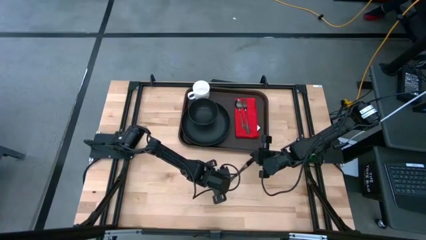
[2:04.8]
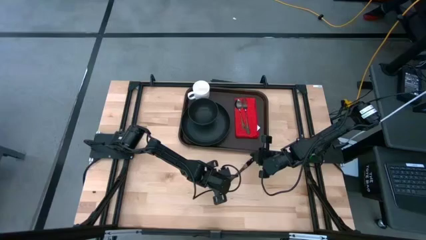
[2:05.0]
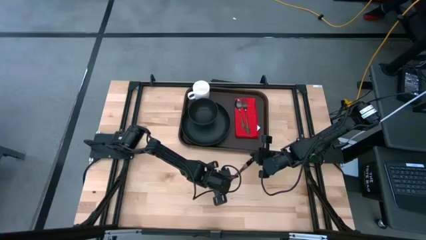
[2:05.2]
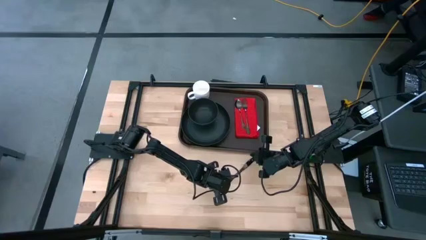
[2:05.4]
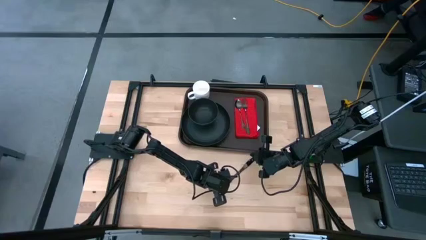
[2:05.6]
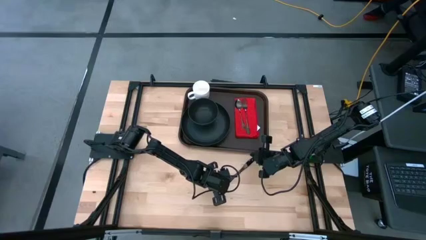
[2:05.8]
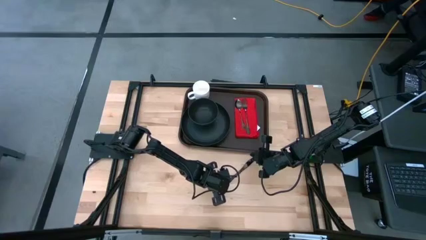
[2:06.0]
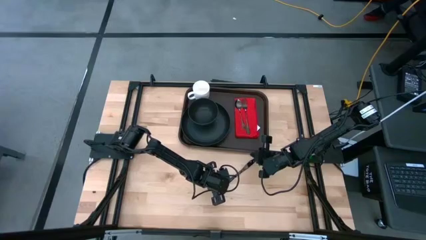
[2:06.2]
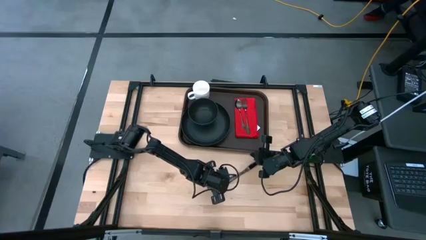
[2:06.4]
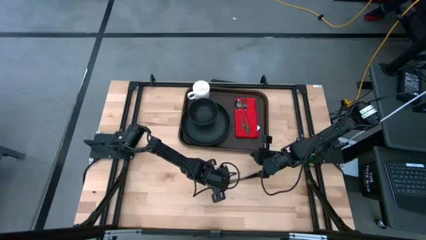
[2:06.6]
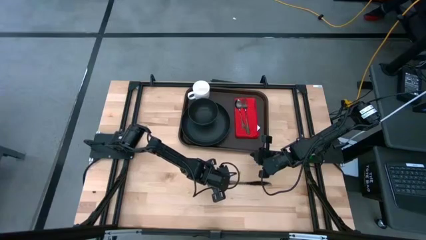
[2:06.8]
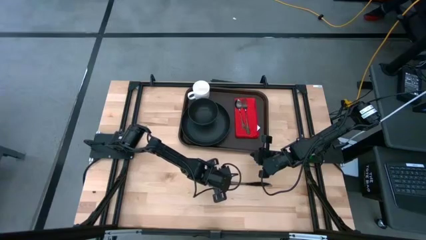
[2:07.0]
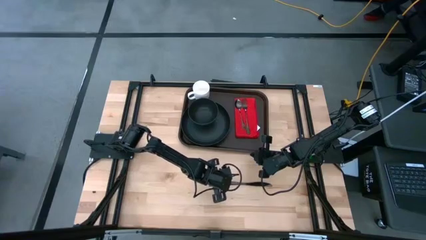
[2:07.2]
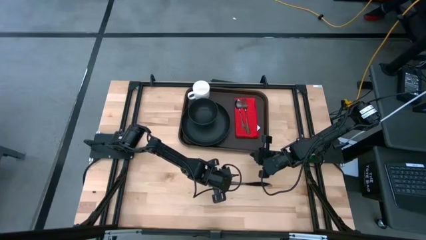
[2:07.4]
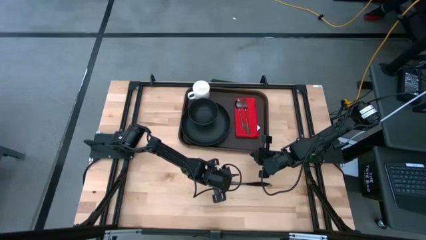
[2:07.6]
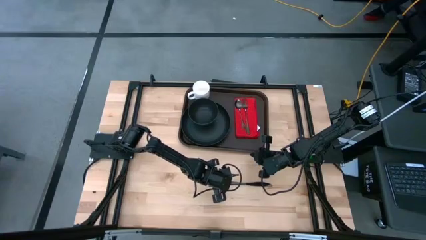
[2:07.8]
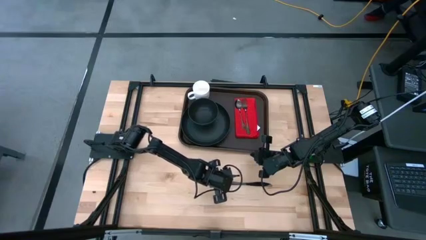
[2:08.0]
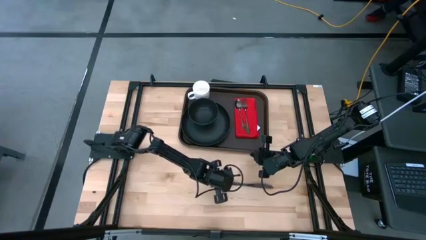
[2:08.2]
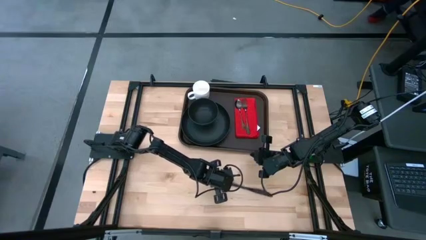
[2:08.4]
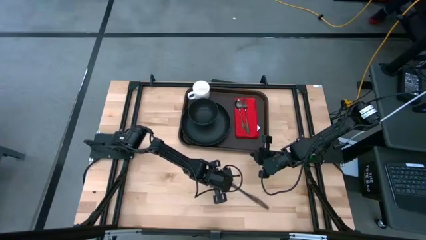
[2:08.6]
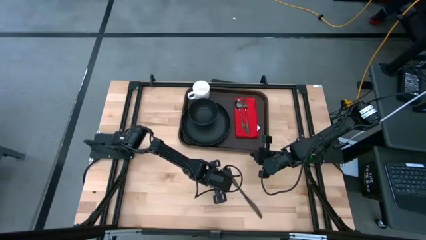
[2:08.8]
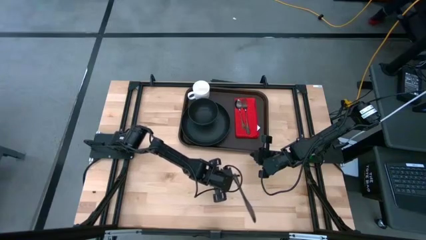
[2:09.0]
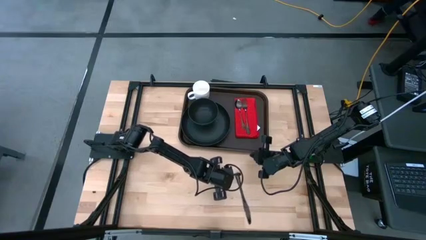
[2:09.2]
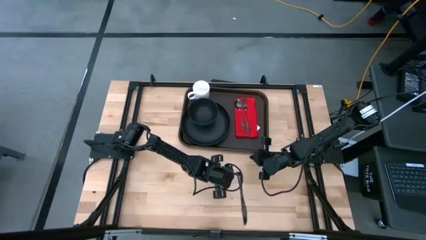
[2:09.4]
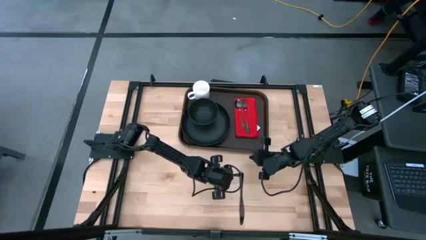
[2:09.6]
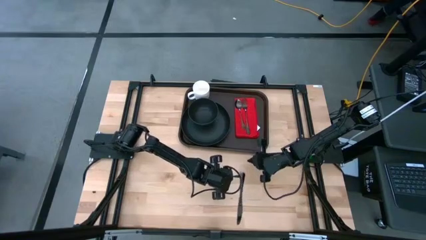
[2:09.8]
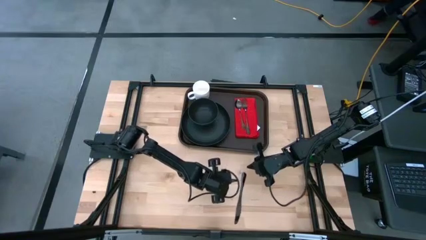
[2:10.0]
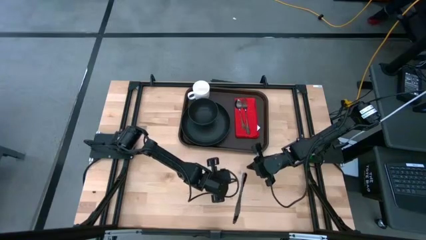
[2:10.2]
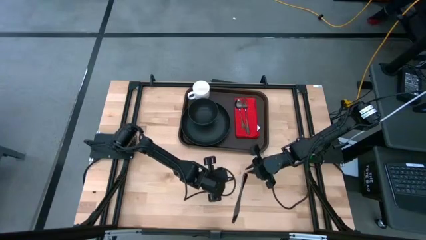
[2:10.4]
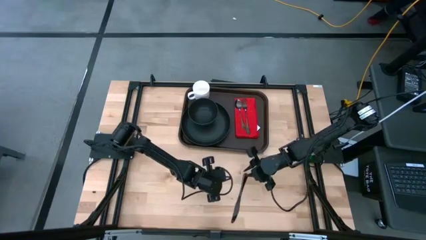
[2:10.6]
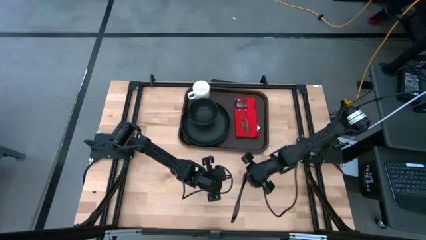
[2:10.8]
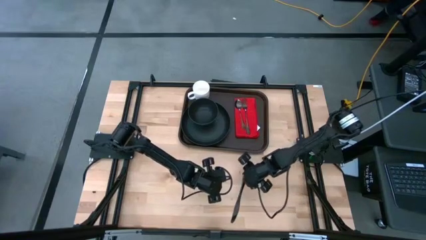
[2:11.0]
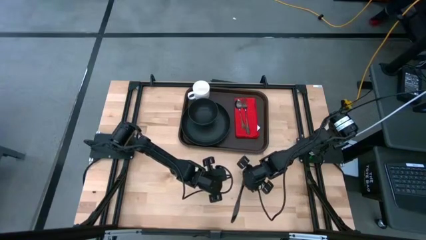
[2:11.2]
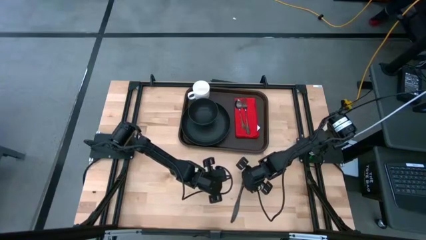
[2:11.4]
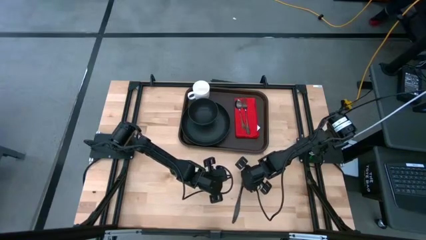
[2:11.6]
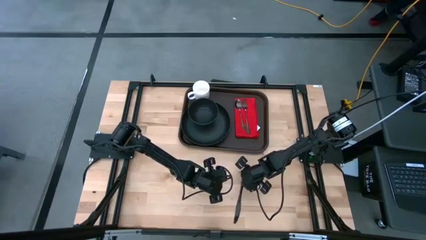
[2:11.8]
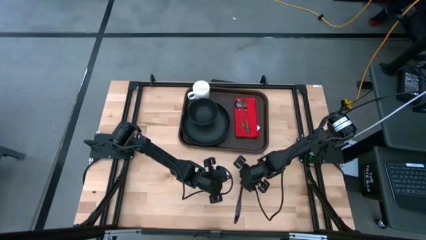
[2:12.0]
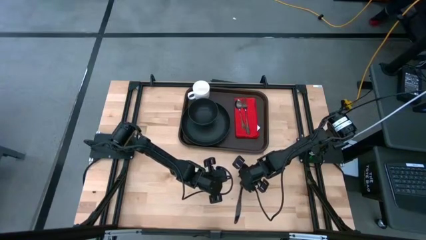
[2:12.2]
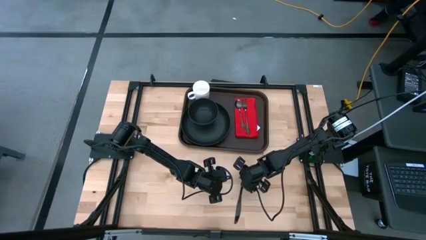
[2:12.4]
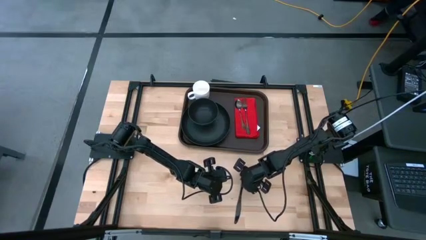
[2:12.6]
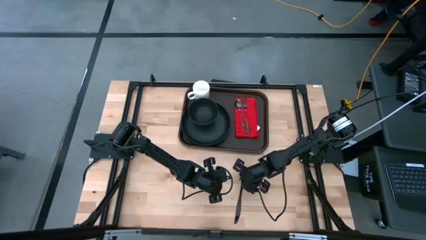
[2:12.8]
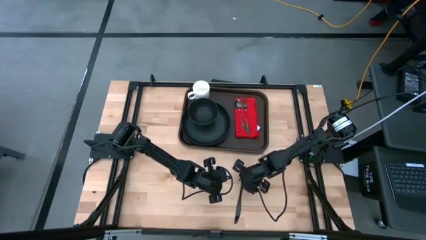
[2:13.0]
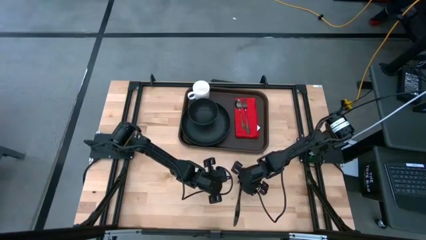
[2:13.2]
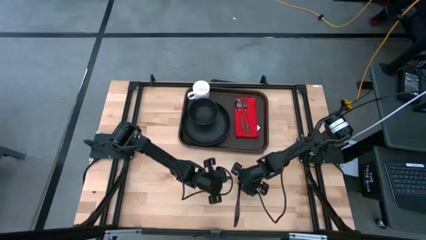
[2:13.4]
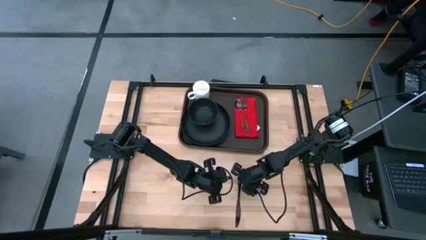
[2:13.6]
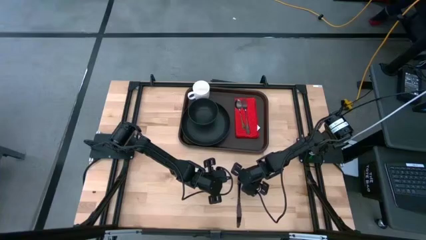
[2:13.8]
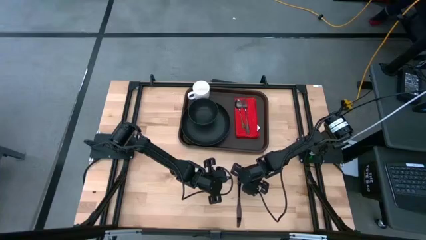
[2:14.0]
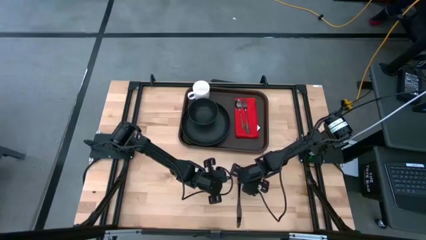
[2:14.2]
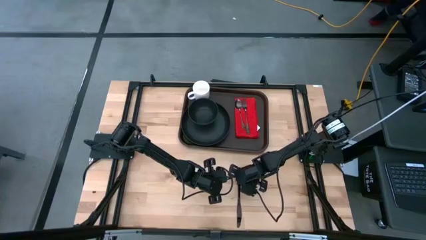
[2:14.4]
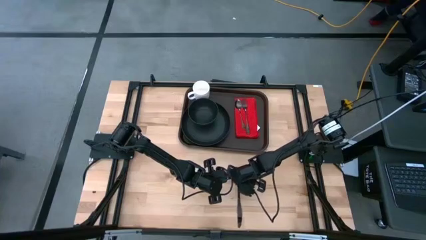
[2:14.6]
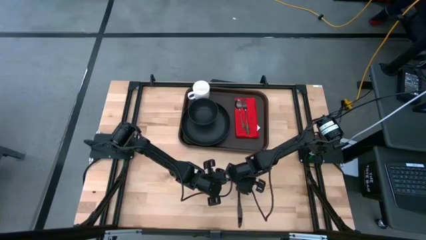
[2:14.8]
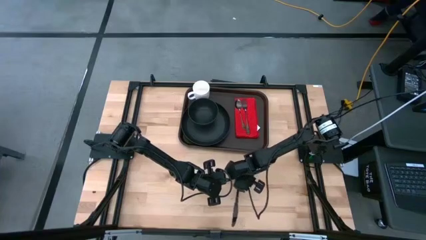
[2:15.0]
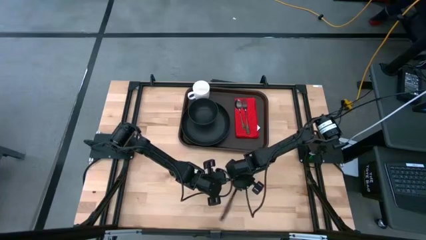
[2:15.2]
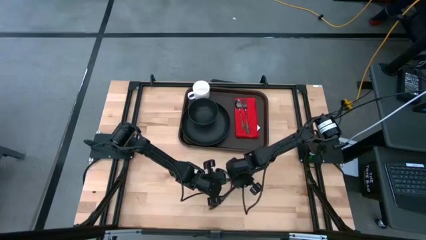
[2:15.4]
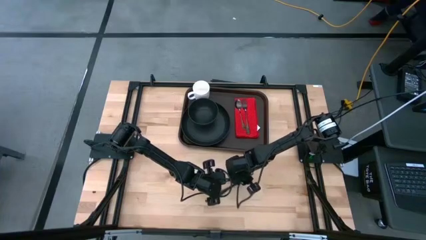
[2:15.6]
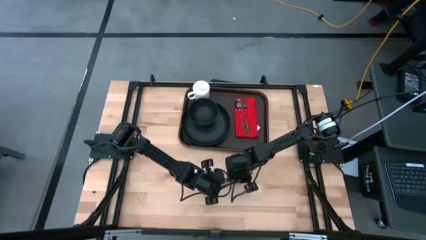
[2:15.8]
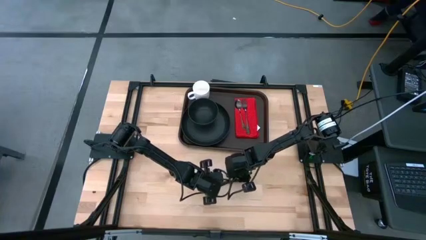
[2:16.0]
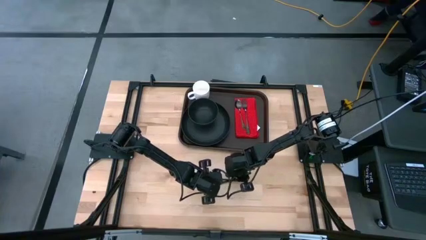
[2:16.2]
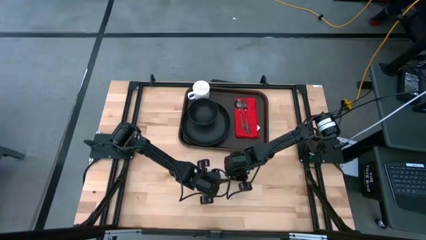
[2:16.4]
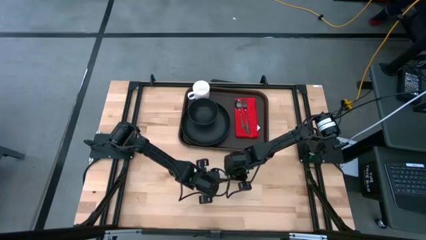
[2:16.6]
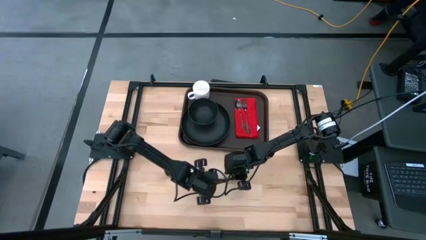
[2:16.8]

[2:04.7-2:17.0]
Task: Set up tray
Put the black knife on the red napkin to the right of the black fork
